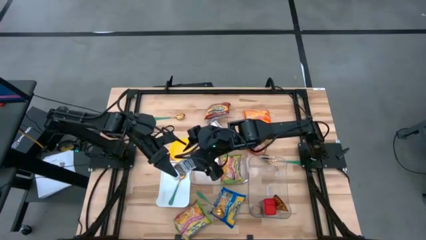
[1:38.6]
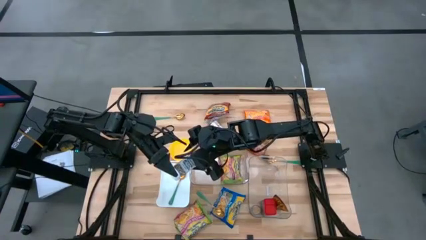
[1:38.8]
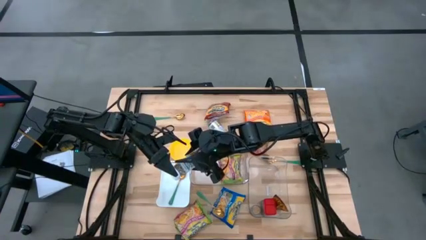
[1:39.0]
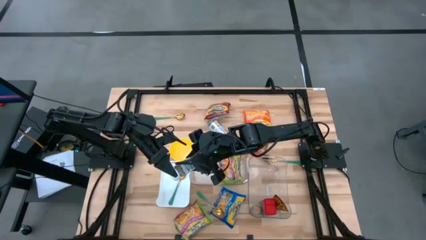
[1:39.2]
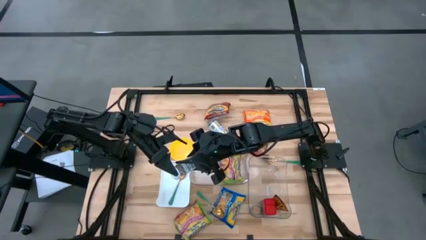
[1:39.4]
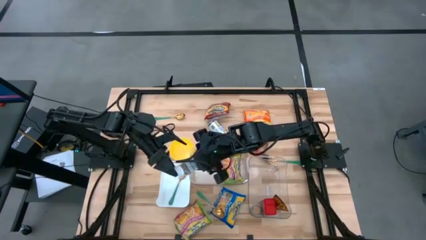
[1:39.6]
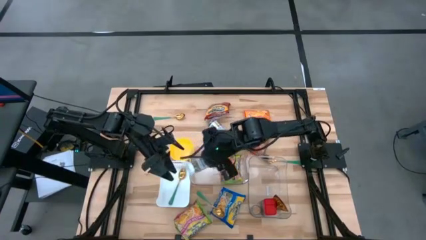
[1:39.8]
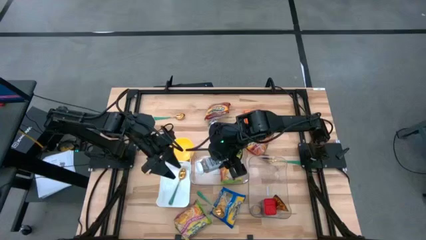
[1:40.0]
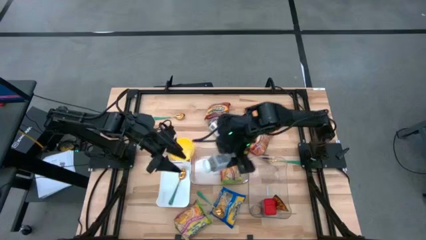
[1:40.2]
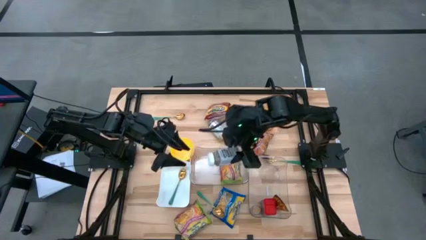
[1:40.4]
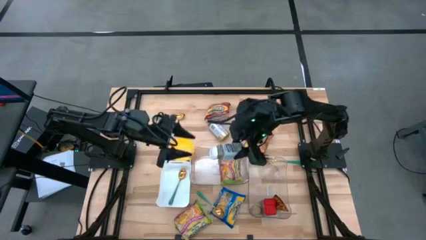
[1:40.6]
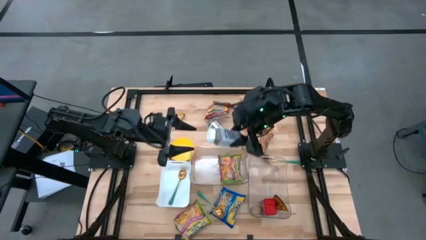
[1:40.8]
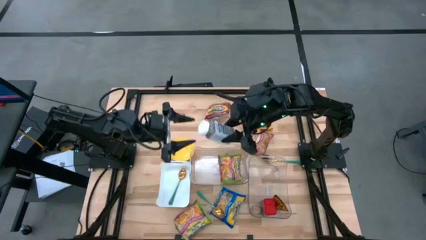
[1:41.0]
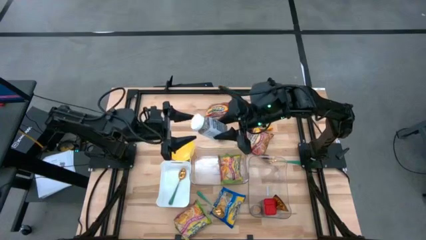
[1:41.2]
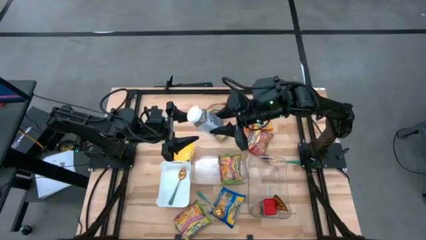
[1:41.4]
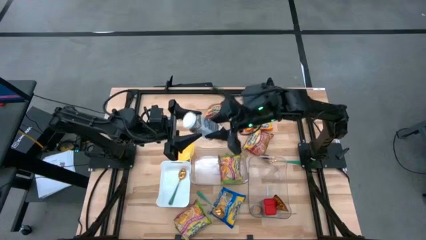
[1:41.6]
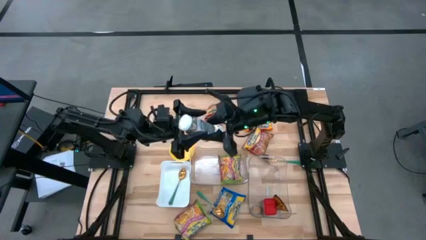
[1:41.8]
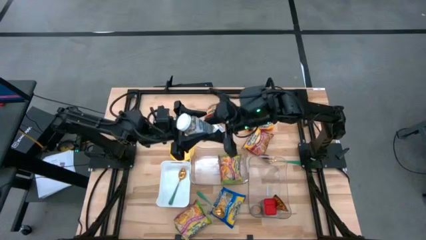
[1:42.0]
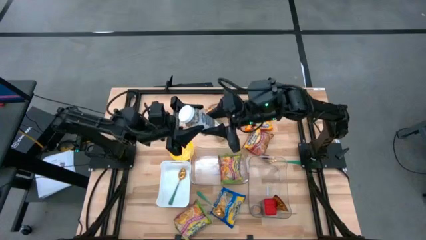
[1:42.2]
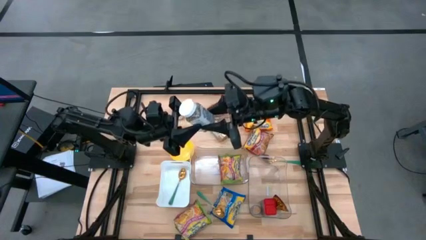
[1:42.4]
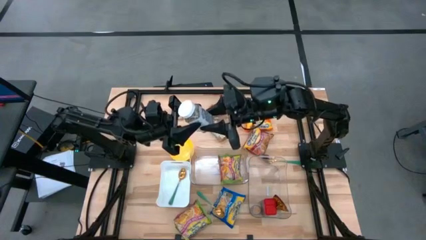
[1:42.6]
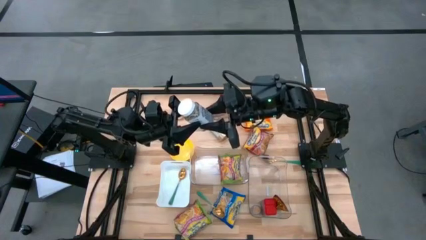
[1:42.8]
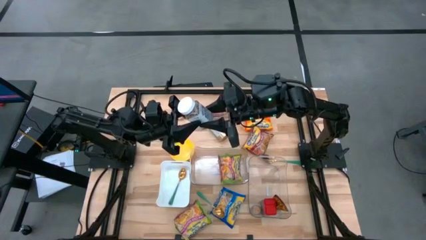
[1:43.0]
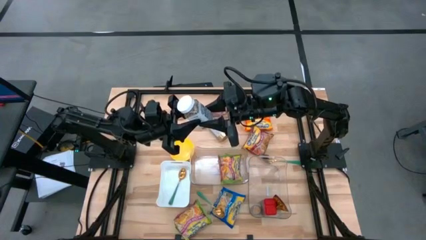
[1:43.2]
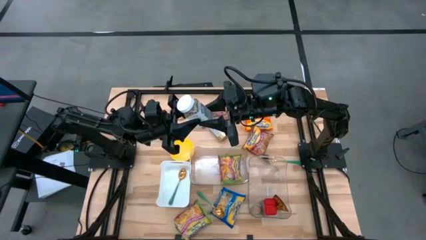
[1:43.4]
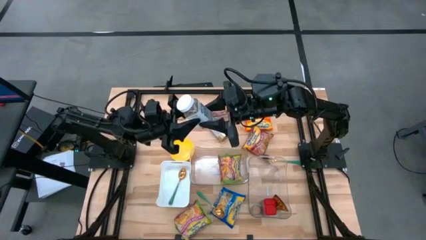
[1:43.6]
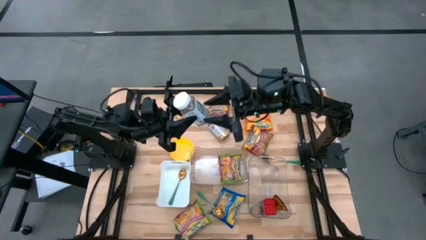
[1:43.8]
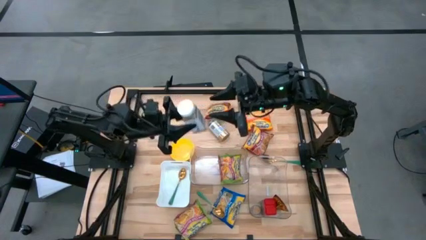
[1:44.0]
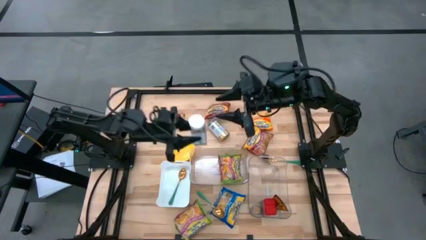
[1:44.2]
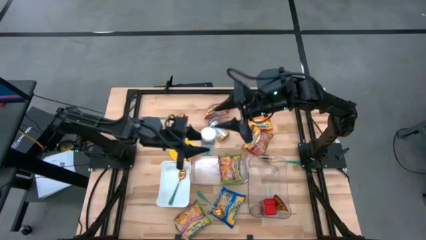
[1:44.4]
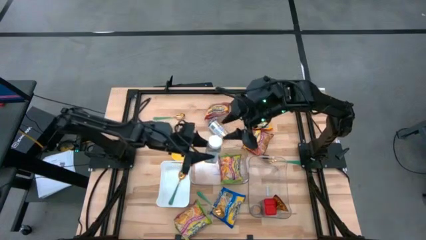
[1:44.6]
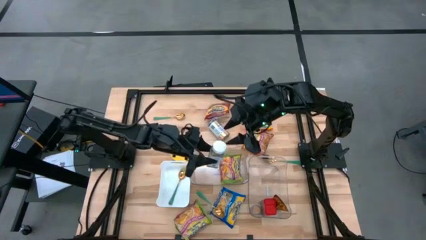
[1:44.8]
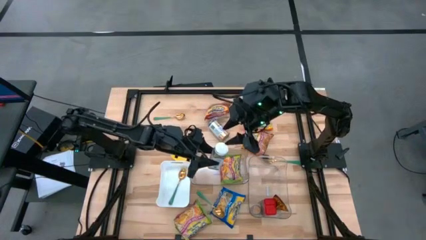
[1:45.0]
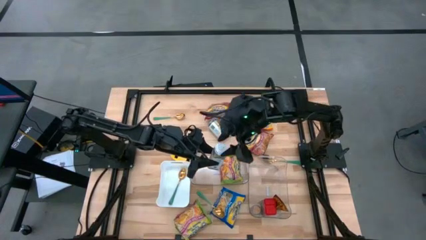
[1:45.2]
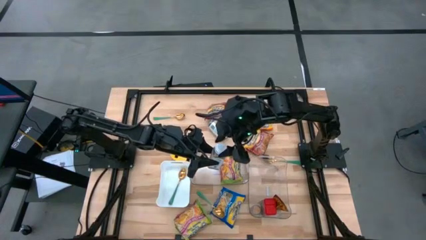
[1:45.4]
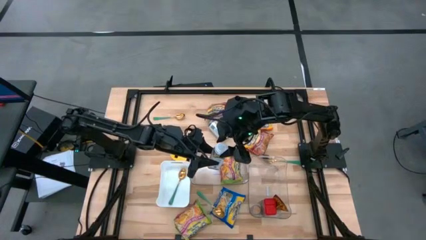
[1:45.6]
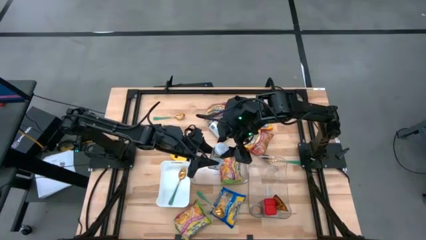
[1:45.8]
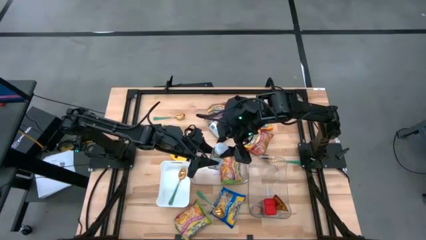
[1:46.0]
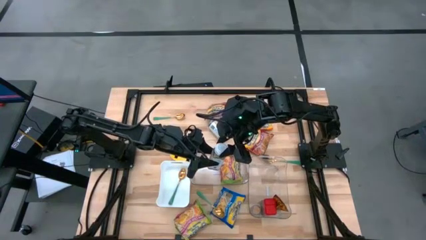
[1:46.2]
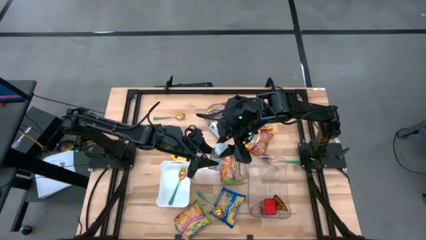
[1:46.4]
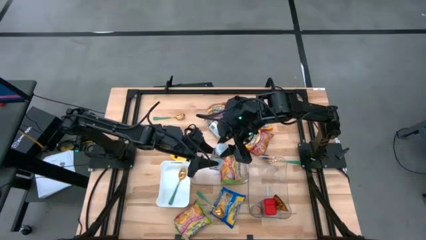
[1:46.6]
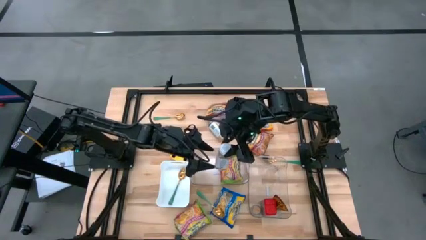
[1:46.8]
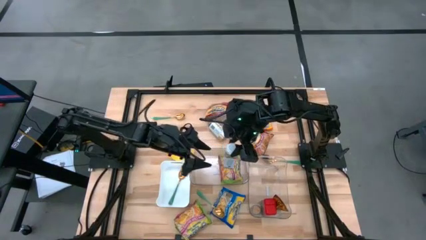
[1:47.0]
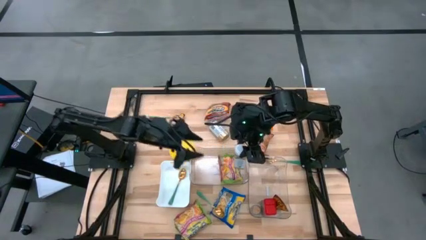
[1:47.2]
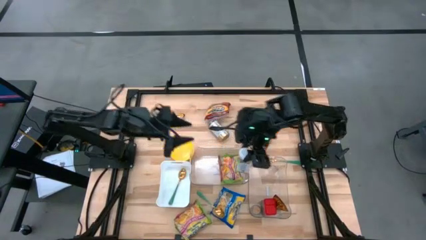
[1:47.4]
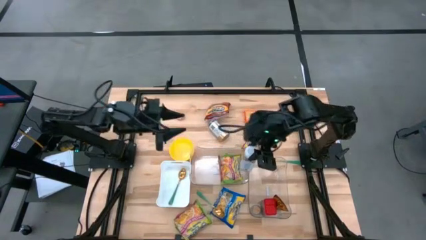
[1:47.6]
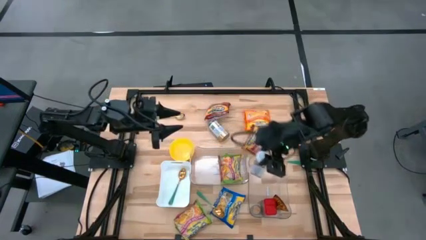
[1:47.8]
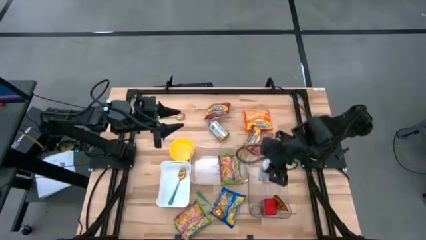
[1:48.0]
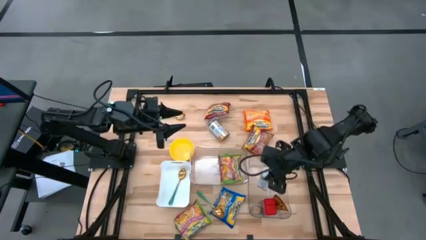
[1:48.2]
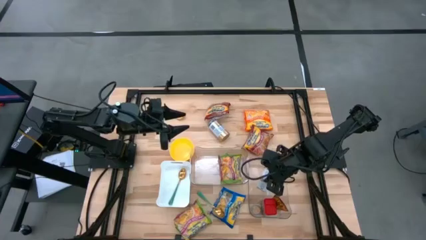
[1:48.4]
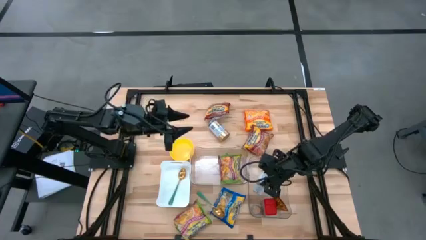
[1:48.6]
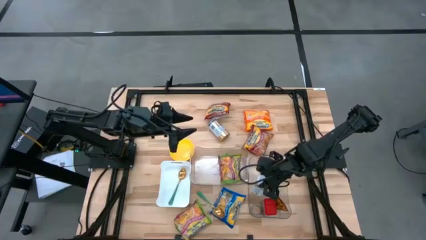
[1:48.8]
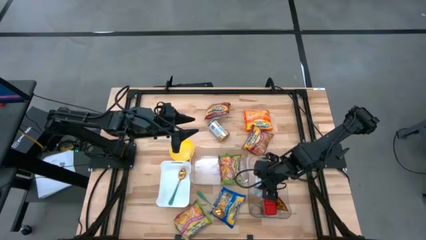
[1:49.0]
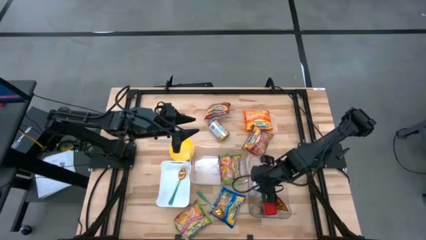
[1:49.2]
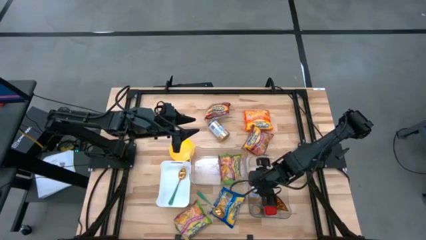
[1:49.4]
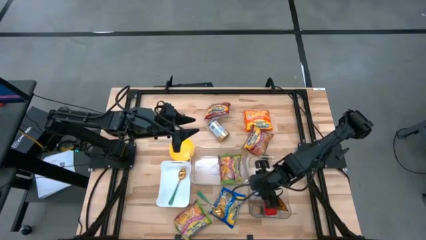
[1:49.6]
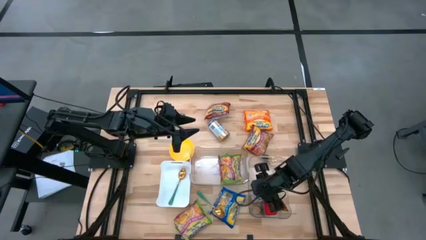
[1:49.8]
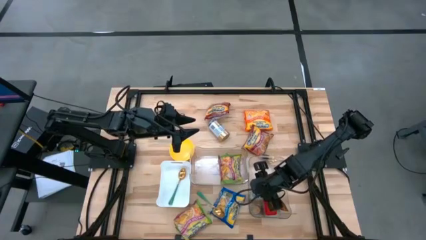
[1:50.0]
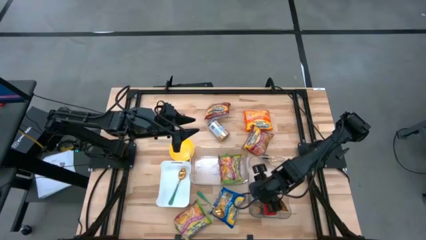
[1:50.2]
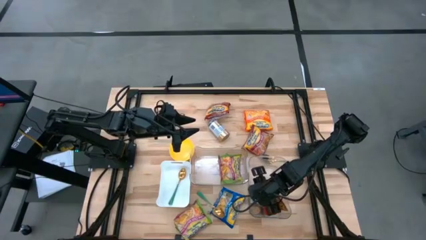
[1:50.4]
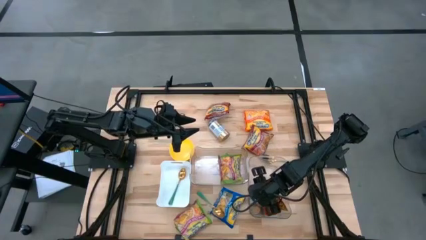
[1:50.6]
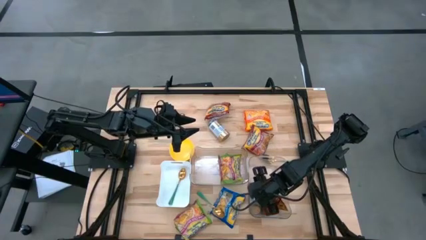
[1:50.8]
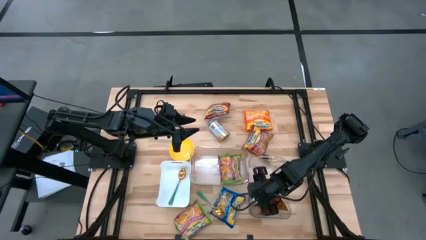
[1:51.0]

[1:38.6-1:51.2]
Task: Pick & Place Food Item
Put the white seasoning bottle into the right transparent bin

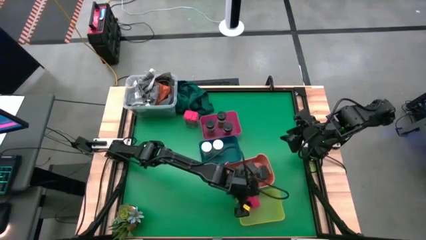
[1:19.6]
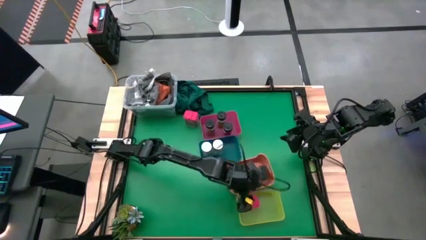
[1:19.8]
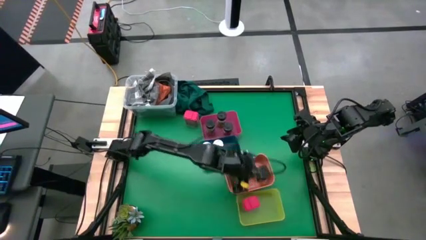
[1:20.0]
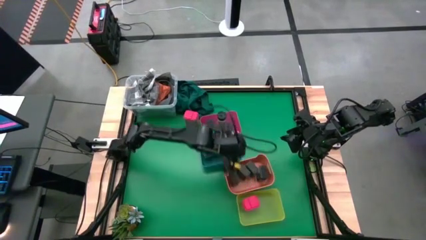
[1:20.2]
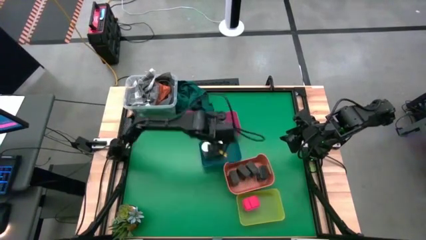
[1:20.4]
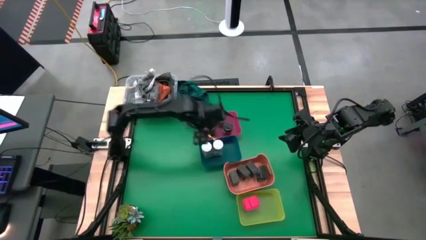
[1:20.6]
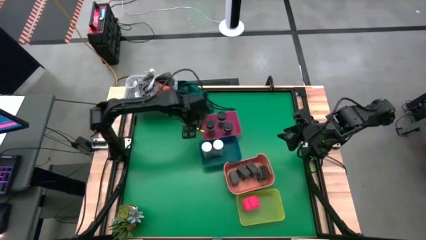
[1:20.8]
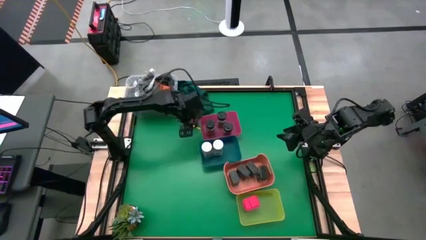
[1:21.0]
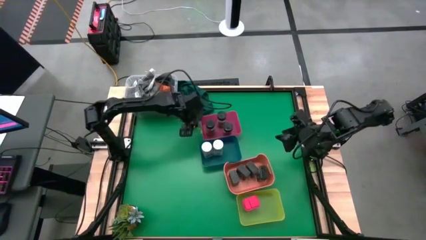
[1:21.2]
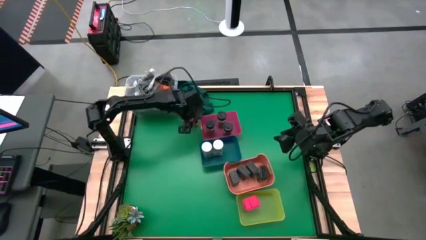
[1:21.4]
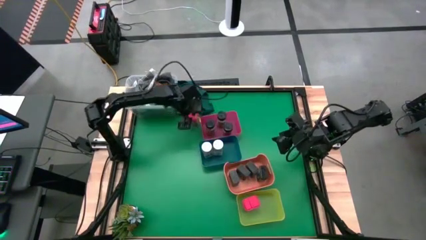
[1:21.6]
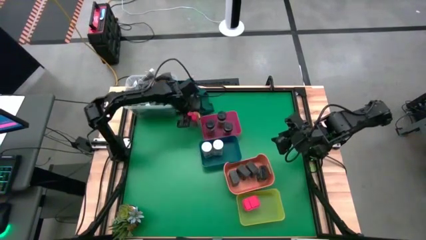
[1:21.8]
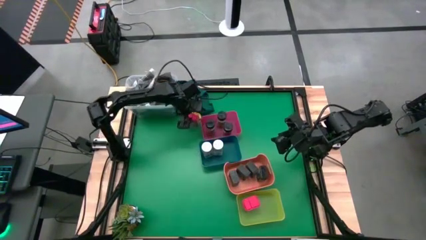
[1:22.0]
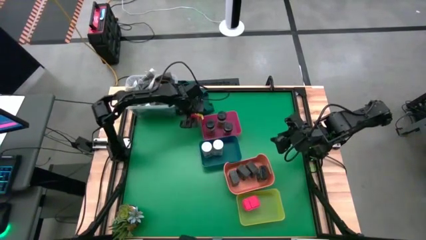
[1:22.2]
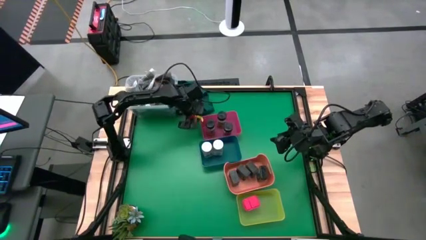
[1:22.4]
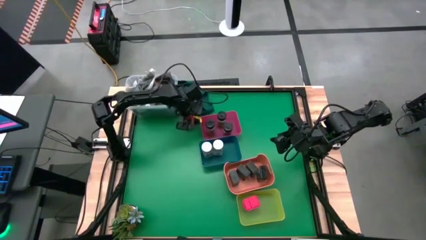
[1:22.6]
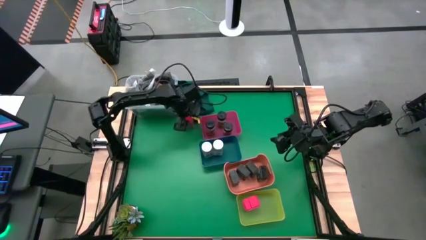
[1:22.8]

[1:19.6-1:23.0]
Task: Sort spices by type
Put the red seasoning can into the yellow bin
